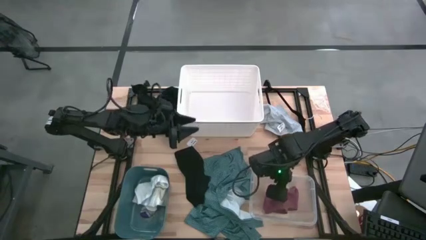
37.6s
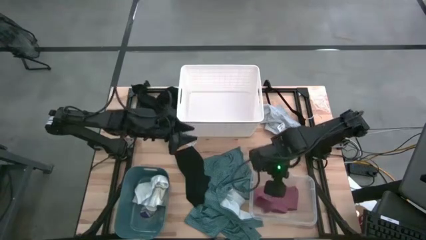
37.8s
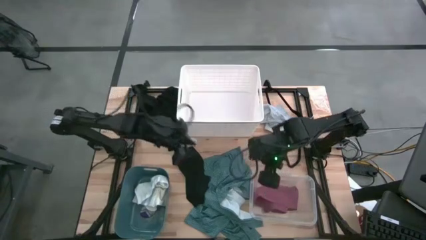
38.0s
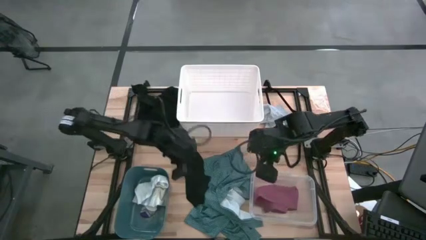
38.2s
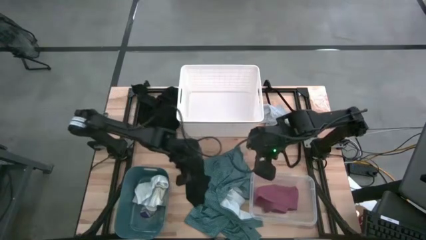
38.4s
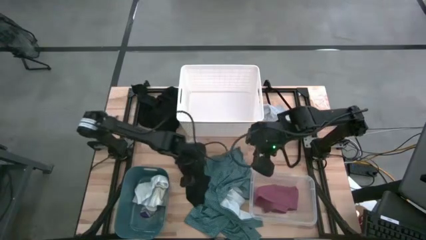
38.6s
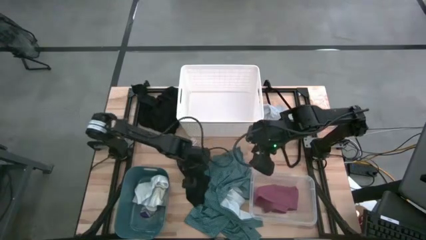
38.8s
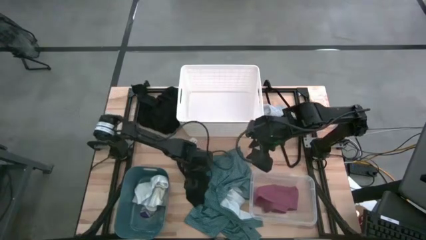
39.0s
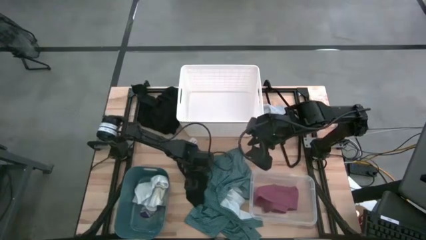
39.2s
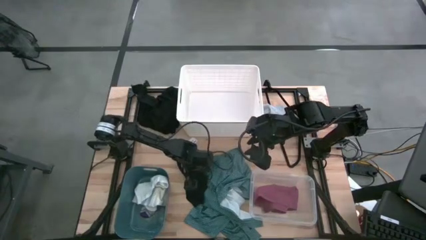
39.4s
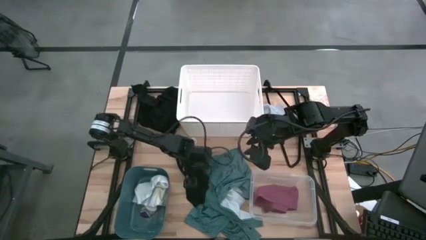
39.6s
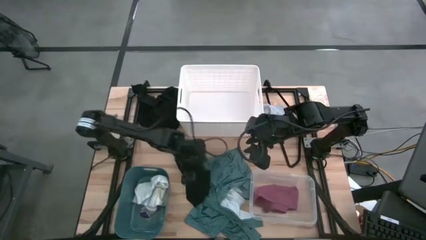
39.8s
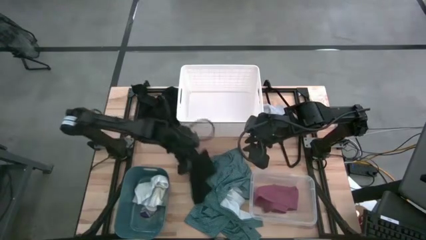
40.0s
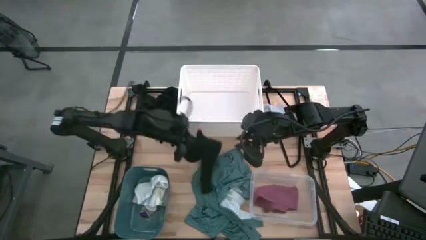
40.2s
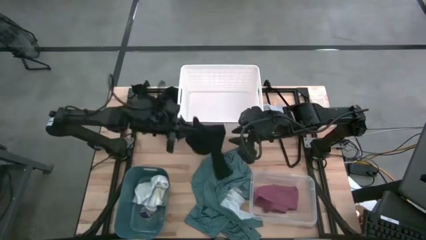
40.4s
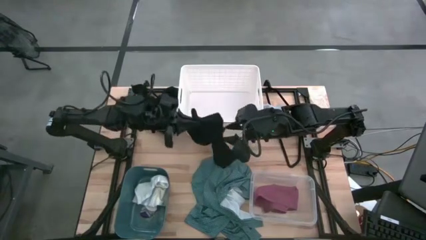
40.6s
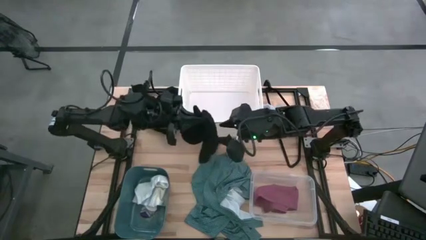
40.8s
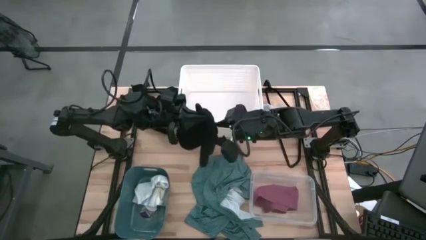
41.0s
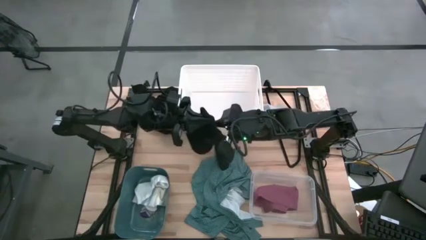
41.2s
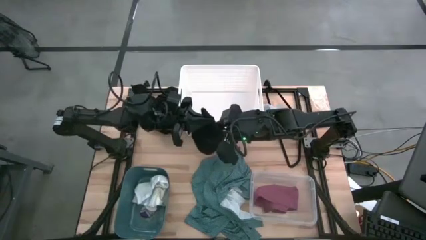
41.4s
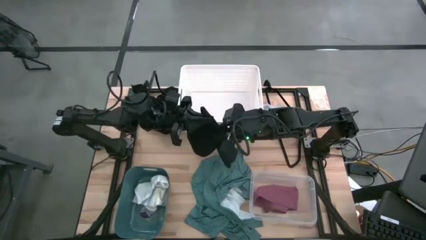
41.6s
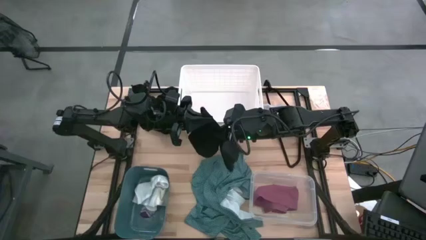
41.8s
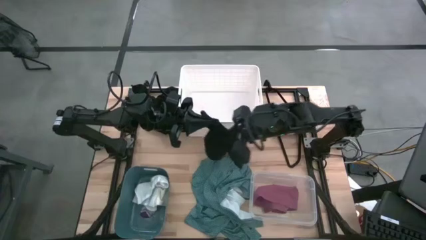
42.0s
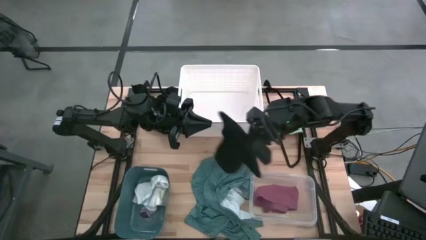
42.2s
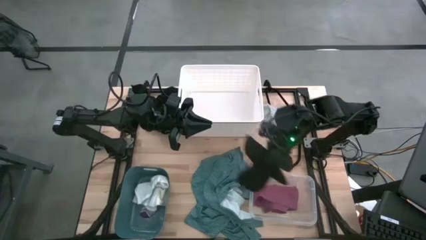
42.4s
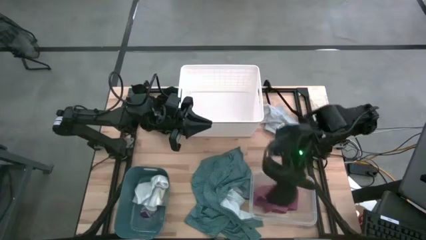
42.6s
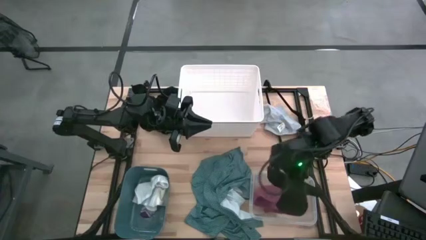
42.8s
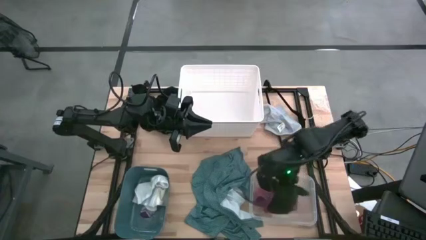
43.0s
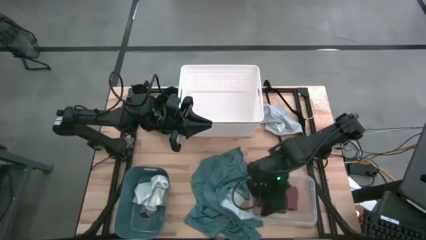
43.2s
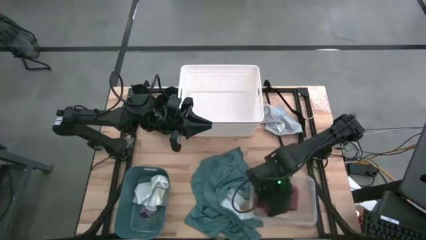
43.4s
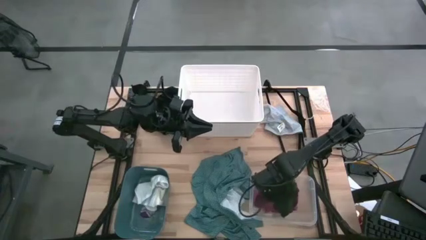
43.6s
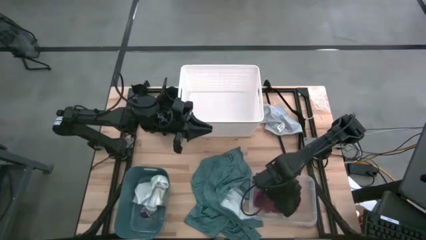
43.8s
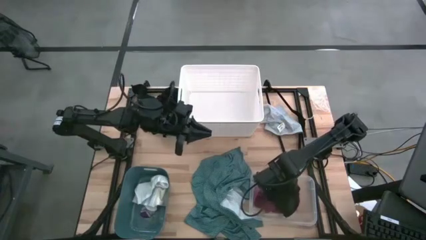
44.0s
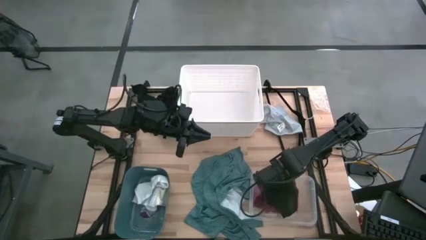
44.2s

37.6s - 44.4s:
Task: Pick & Place Cloths
Put the black underwear into the transparent bin

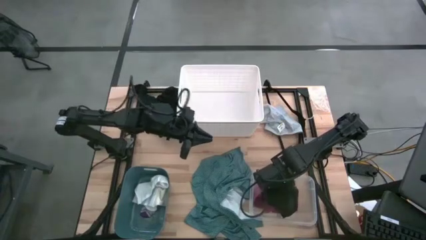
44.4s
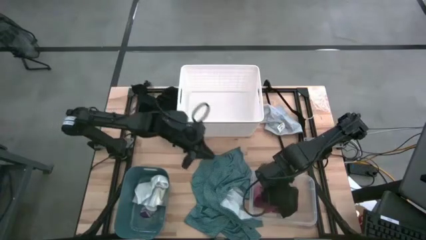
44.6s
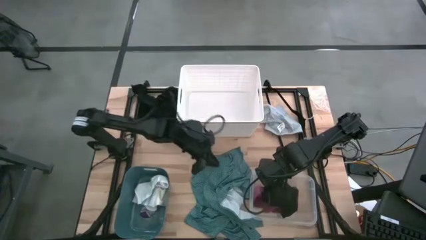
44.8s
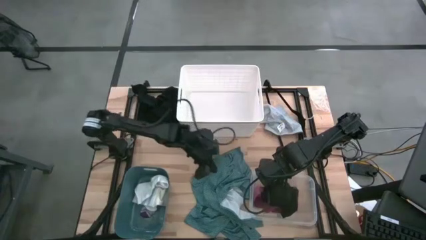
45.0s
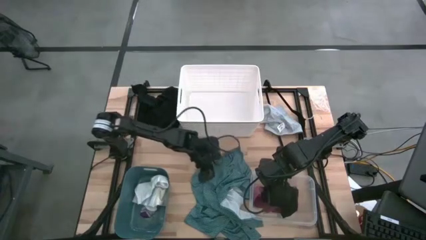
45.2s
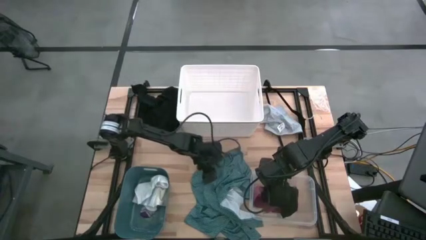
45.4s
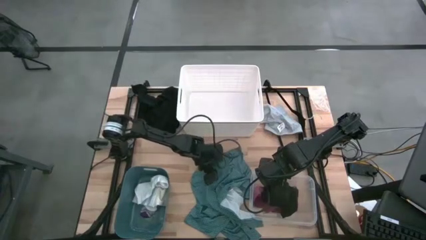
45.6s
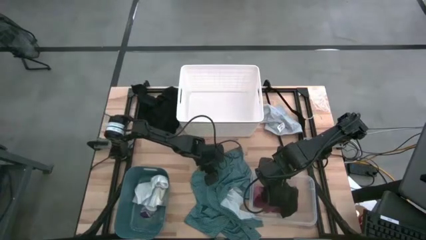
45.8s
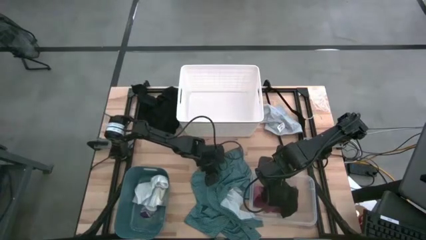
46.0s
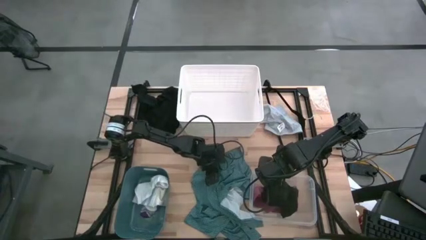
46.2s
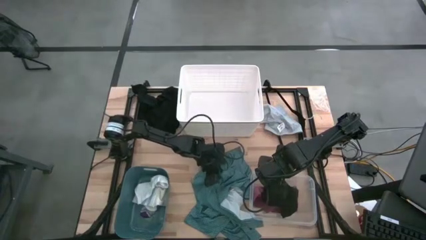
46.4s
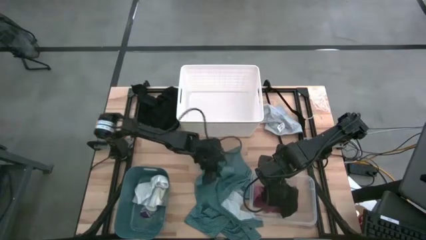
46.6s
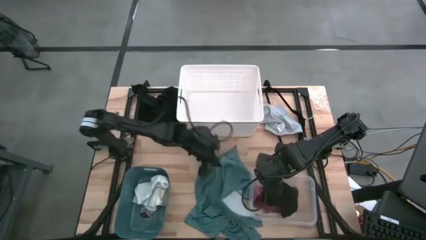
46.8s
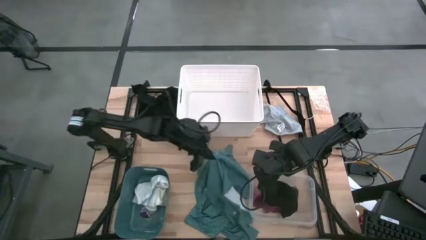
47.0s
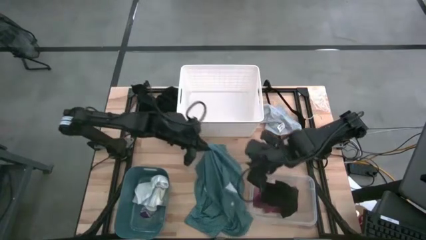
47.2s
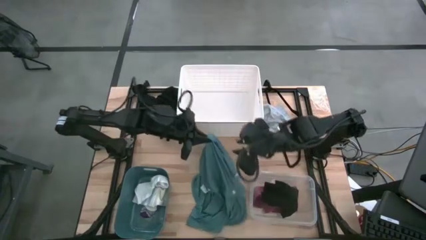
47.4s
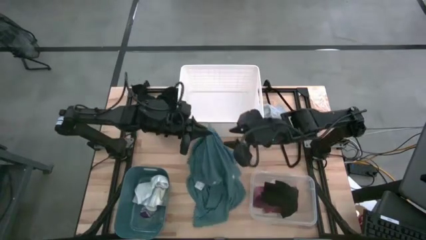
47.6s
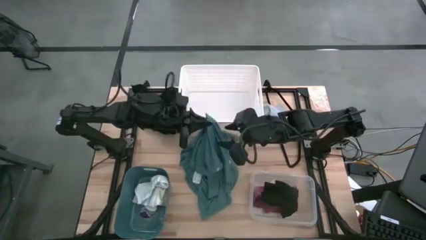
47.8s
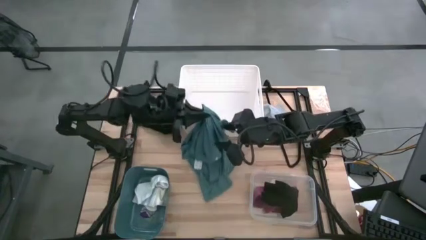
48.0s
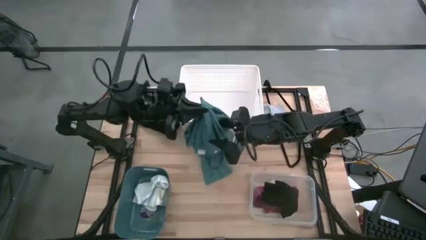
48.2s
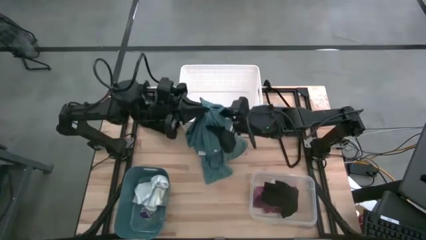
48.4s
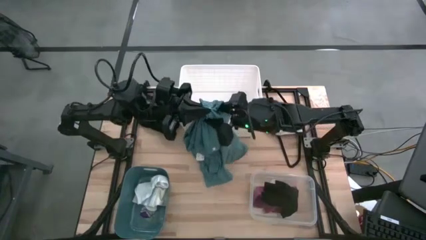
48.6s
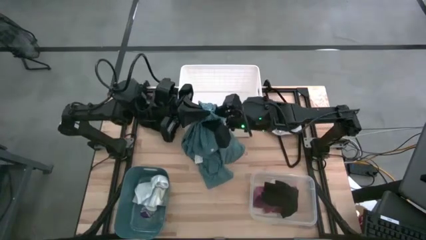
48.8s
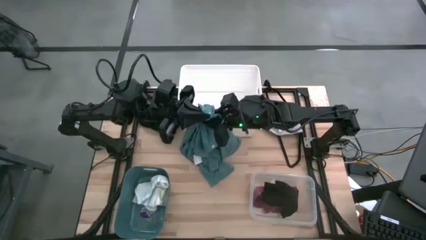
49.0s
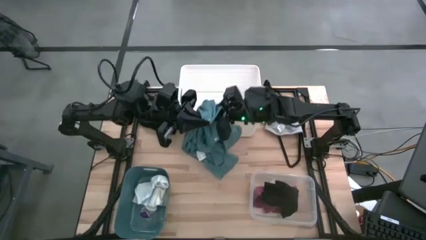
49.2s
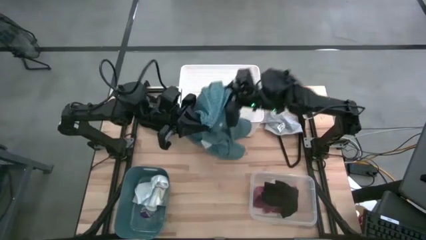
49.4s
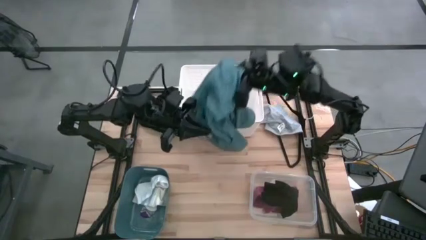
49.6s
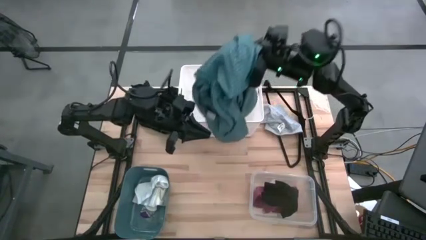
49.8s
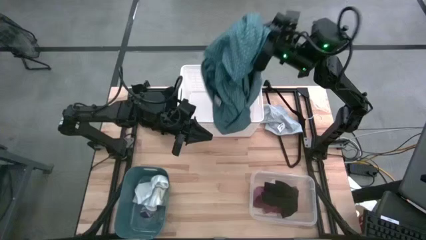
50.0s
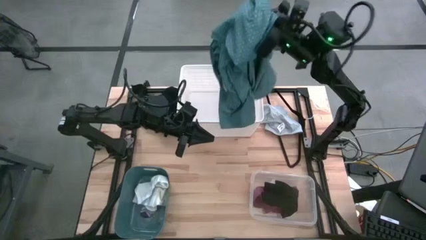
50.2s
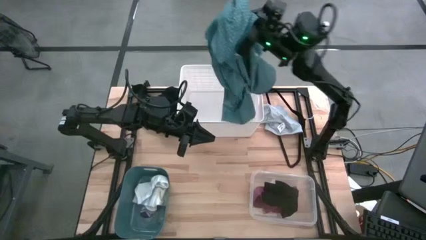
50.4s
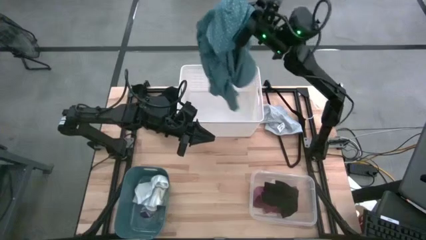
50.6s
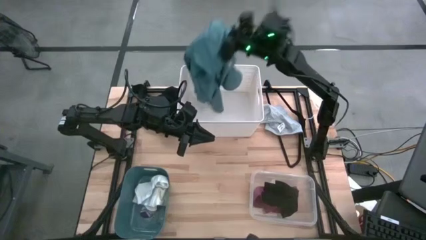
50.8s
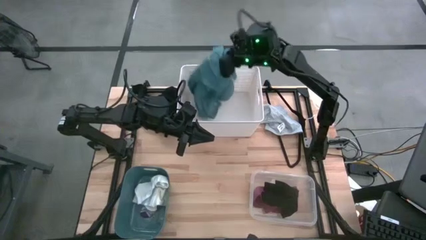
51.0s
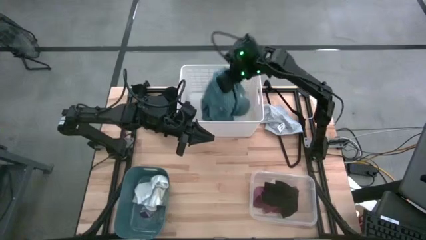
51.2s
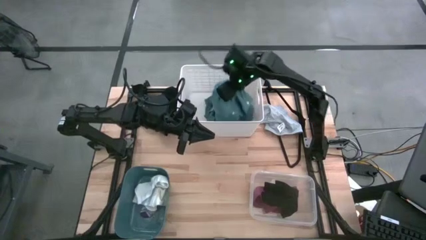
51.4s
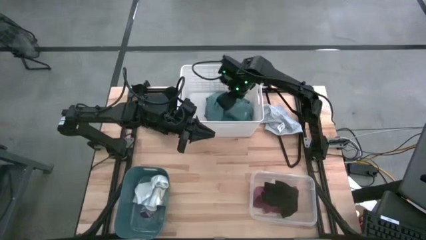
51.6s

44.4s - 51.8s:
Put the blue shirt into the white bin
